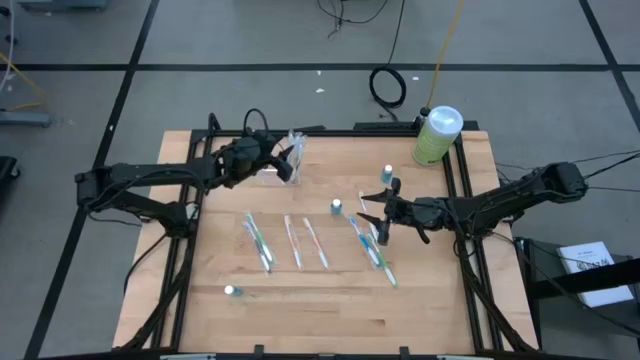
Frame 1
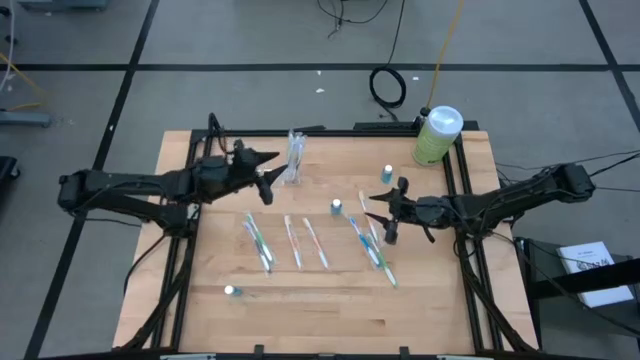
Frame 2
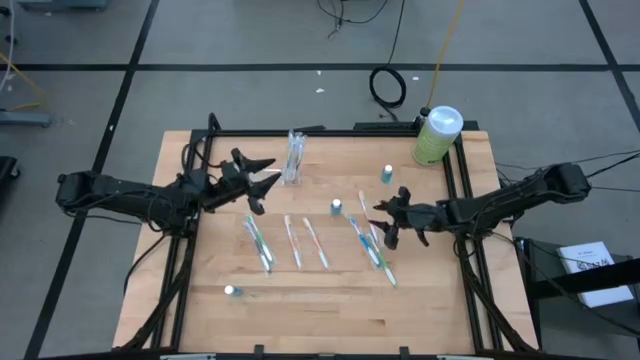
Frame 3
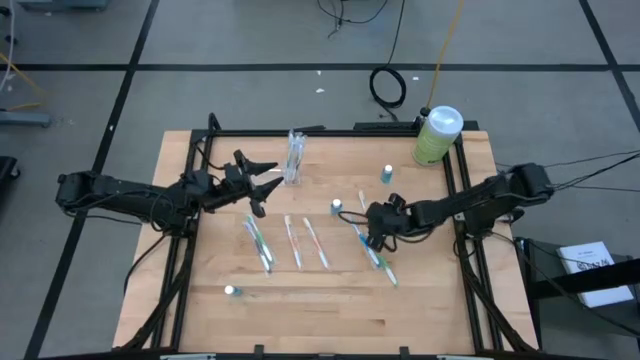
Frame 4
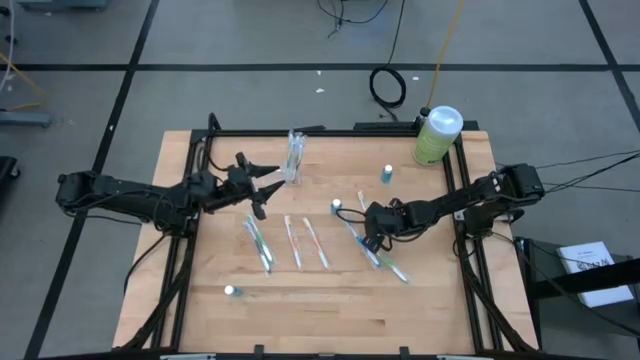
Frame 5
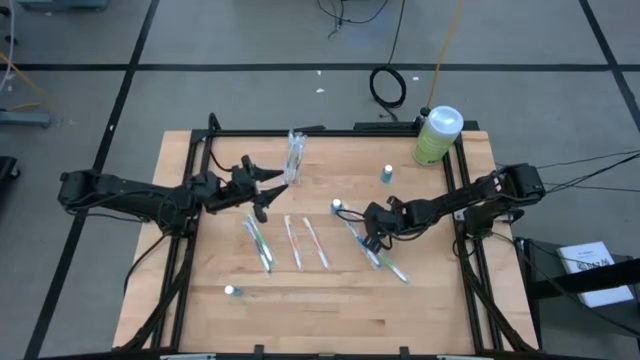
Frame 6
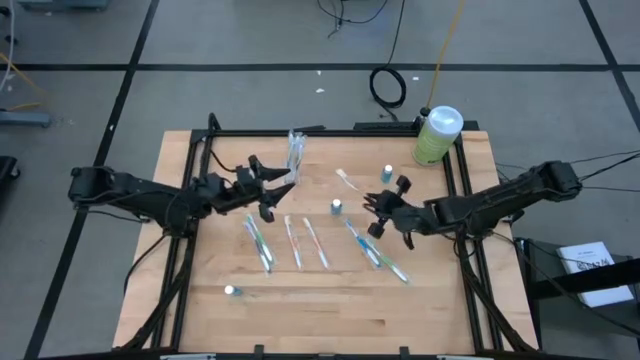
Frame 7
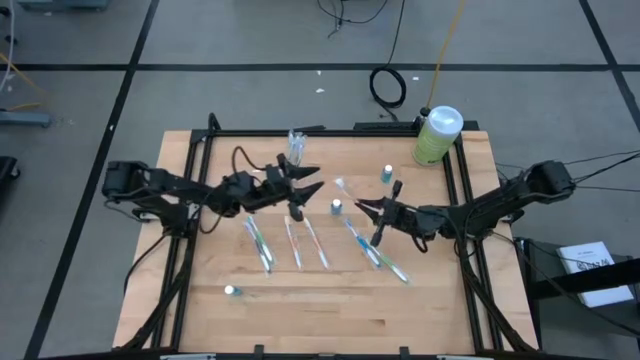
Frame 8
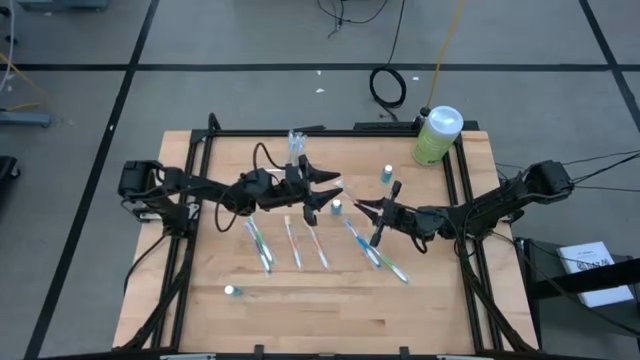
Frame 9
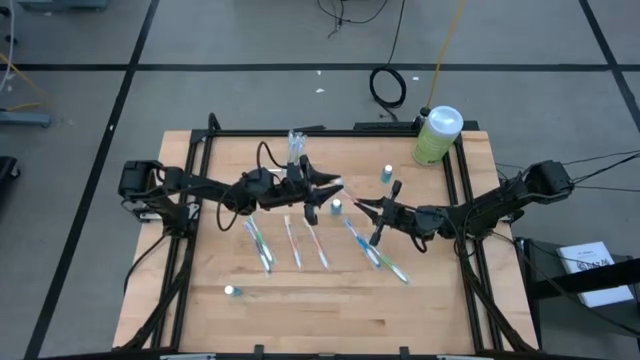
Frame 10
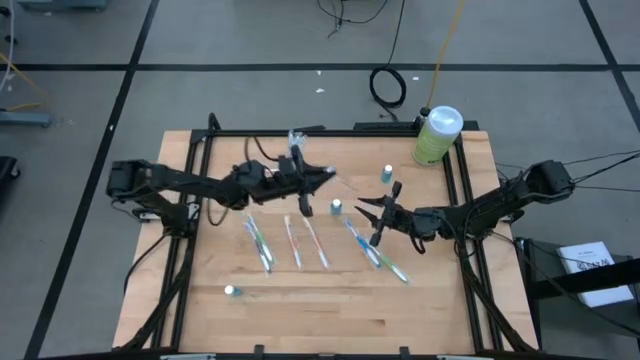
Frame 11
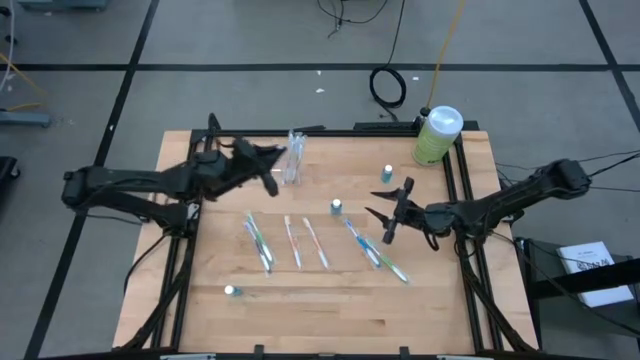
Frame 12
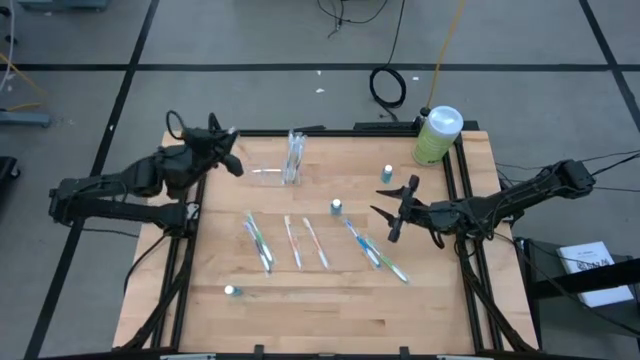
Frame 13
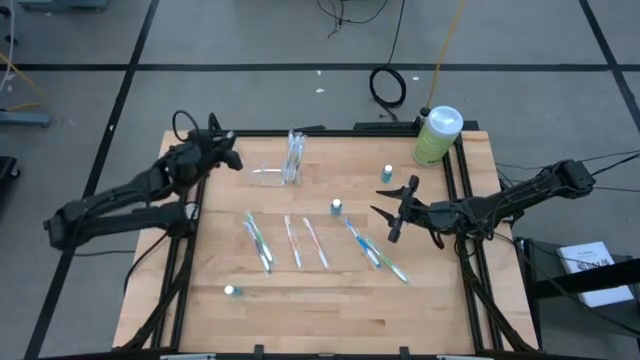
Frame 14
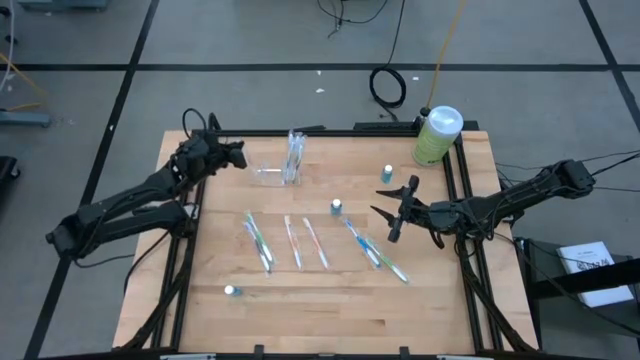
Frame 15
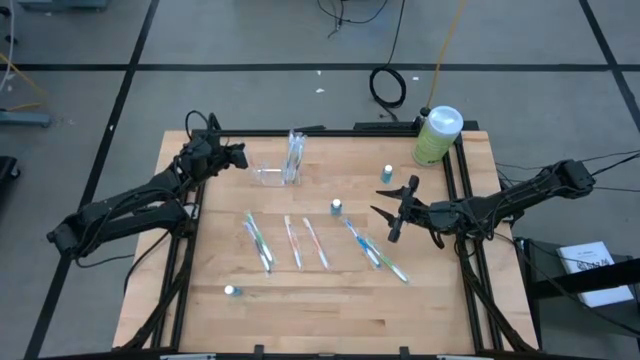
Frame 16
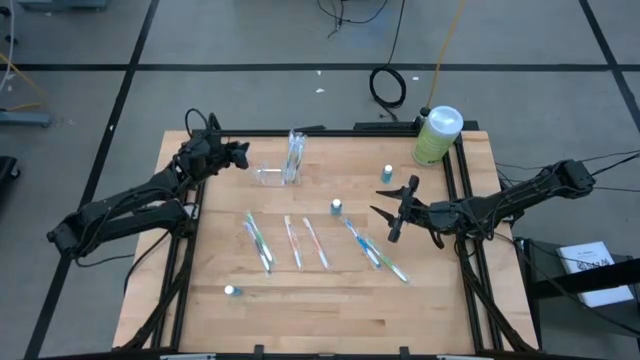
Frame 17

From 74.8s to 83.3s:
Task: Pick & Place toothbrushing station
Put the orange toothbrush into the transparent organizer

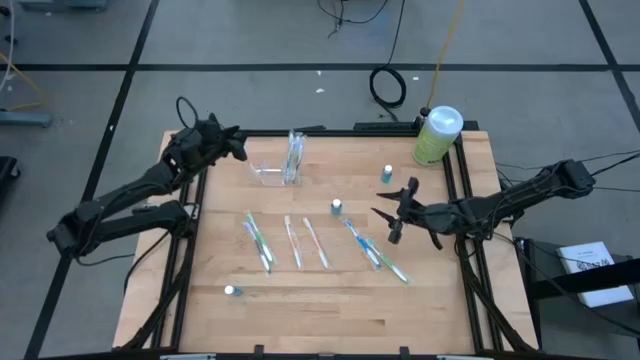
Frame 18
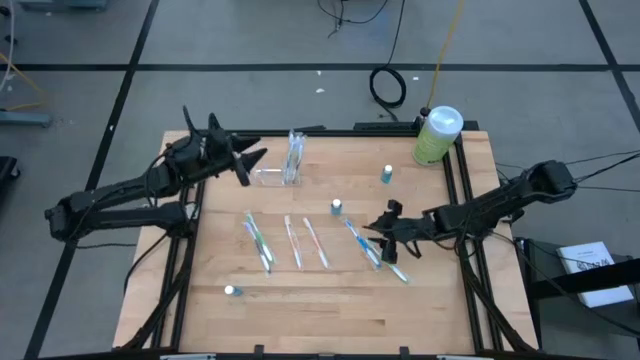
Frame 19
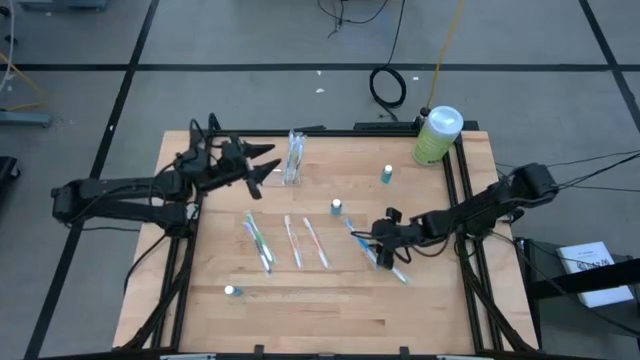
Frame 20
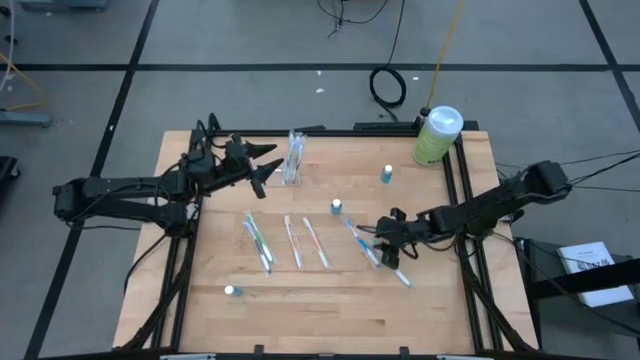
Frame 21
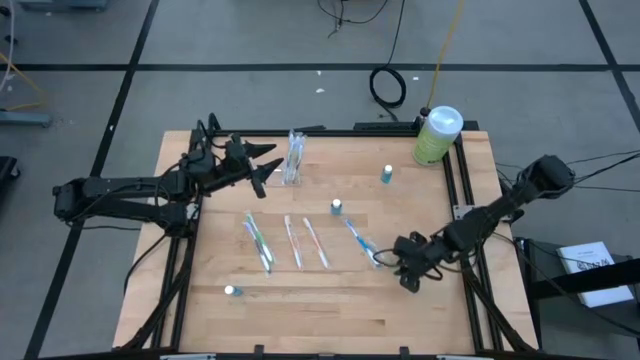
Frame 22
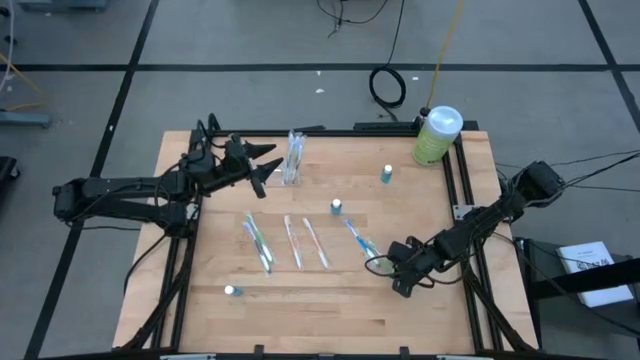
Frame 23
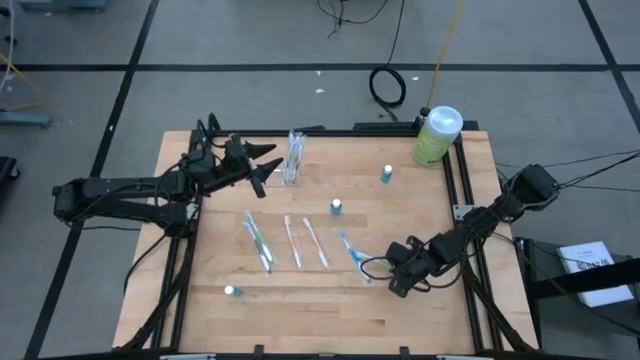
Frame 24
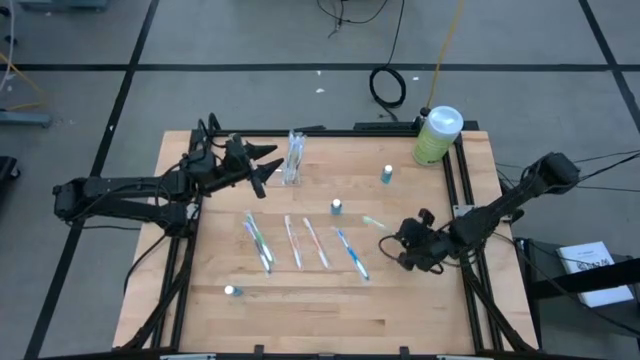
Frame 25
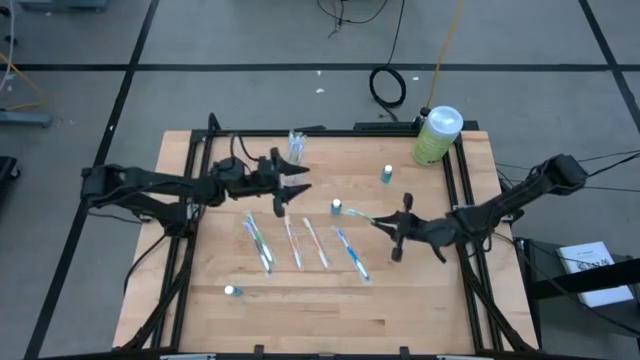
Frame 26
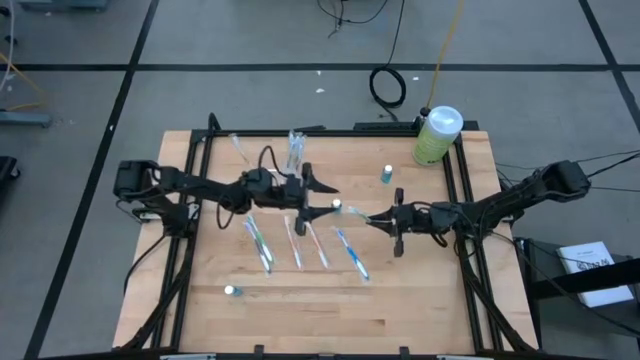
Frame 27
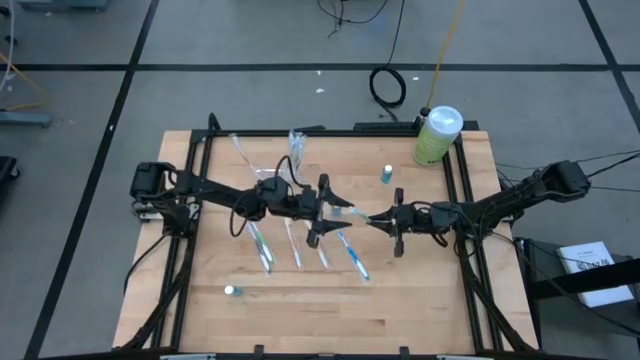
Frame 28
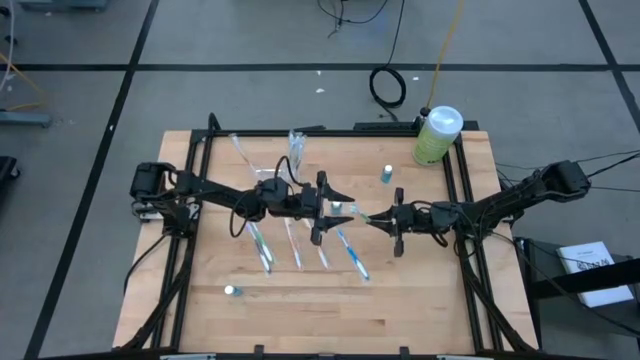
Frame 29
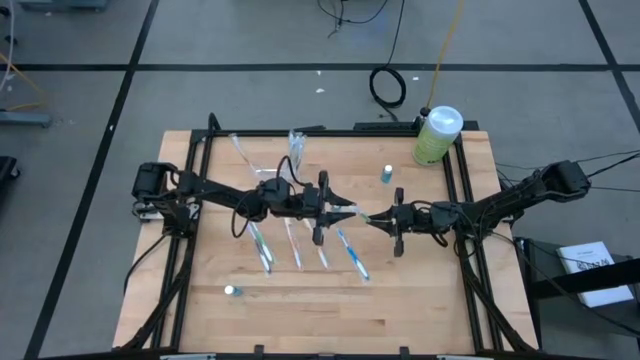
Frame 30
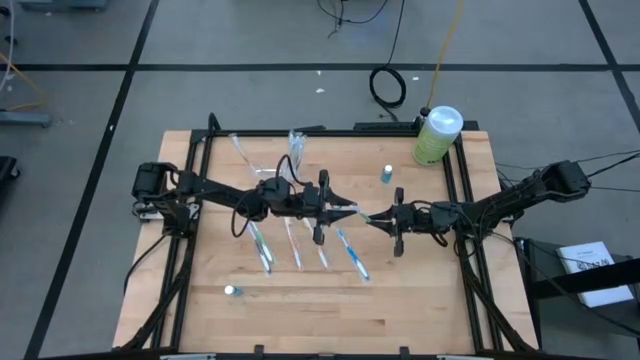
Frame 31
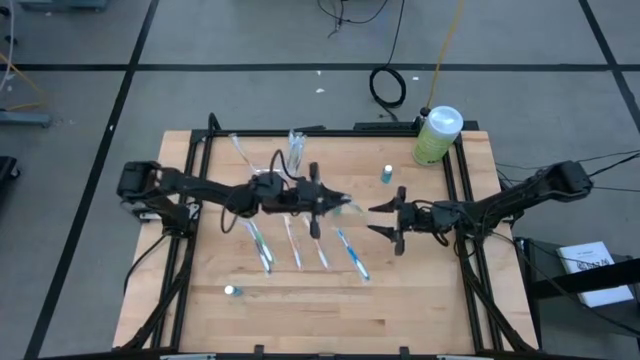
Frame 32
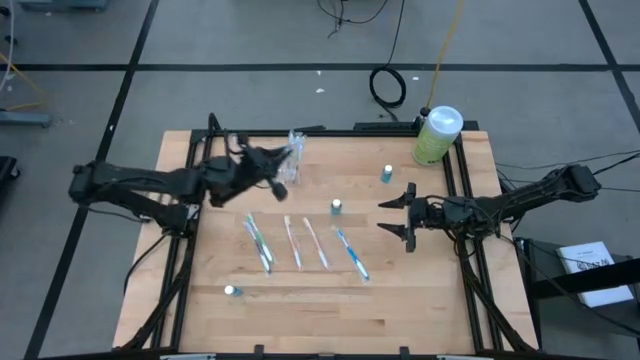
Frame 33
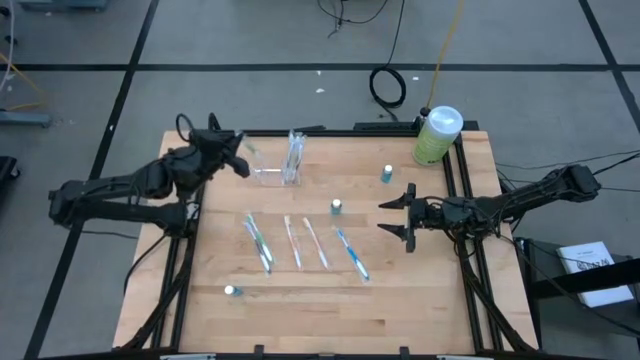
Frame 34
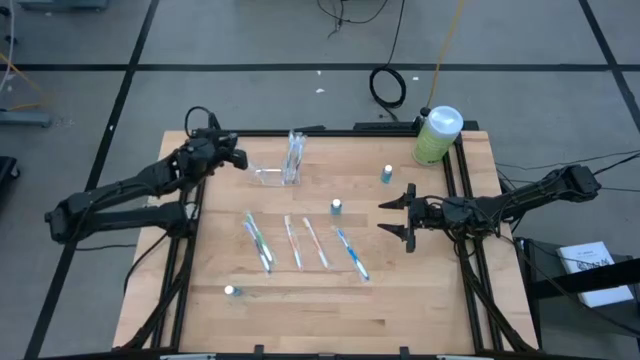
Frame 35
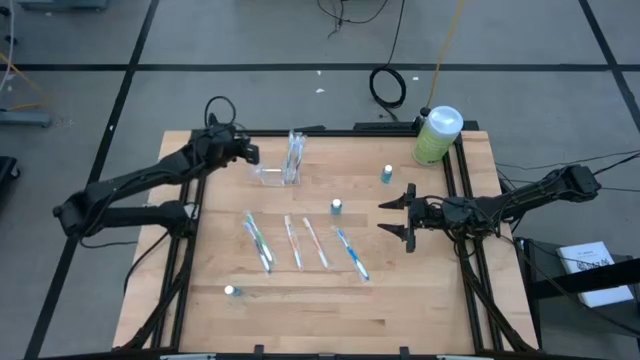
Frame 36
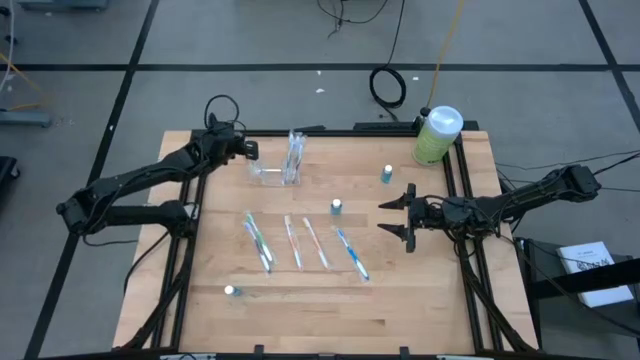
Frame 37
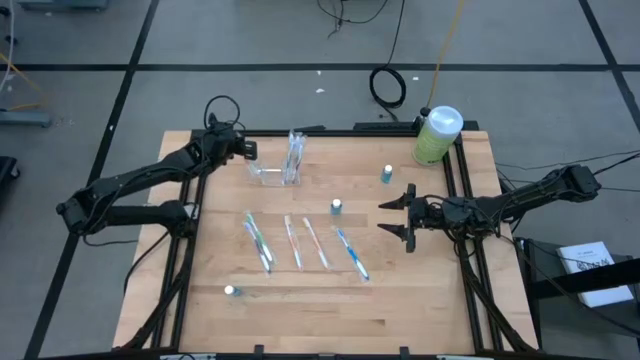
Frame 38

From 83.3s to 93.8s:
Put the green toothbrush into the transparent organizer

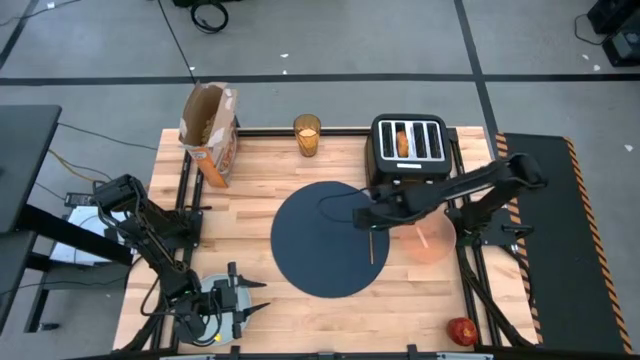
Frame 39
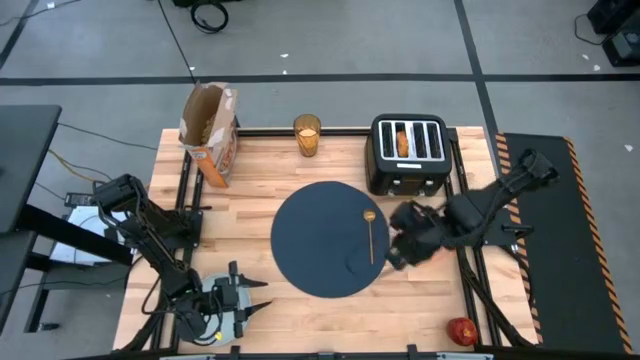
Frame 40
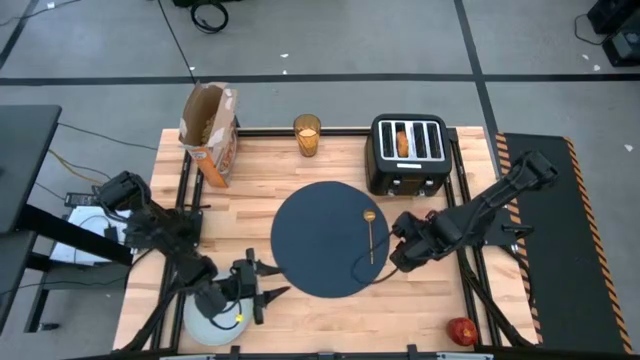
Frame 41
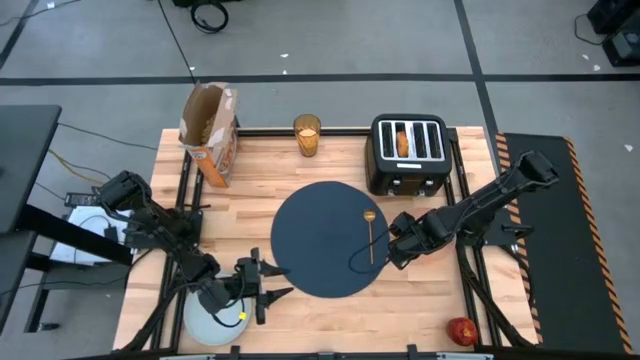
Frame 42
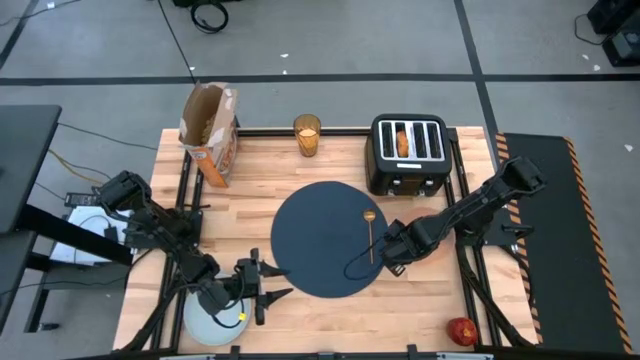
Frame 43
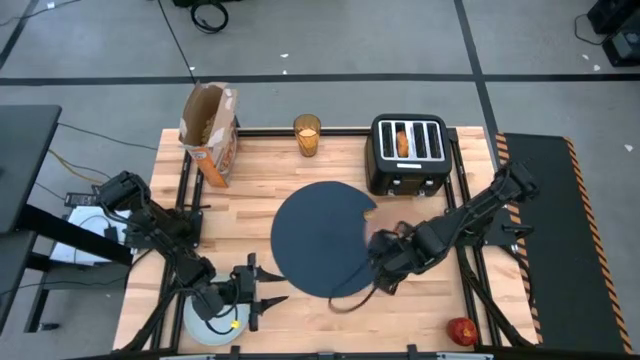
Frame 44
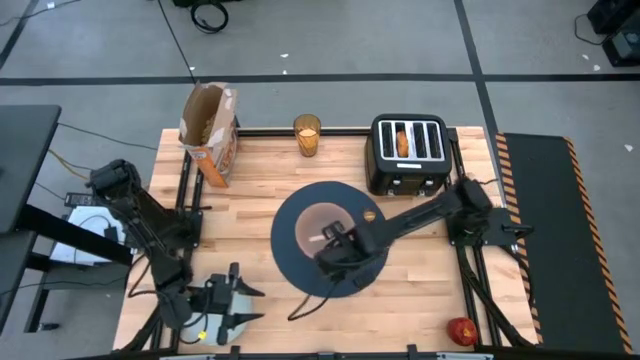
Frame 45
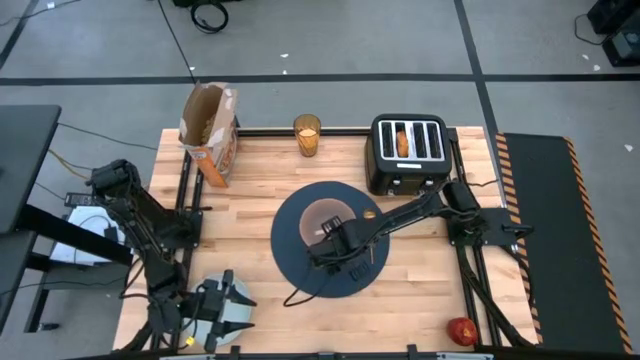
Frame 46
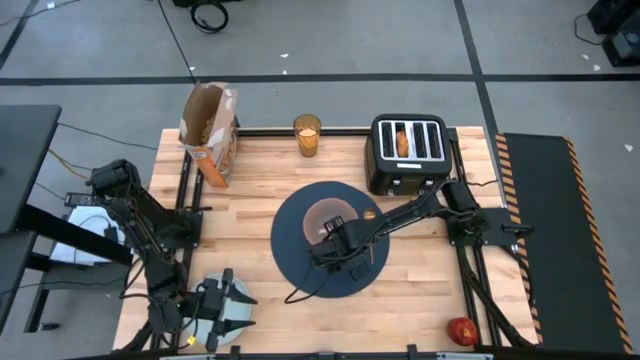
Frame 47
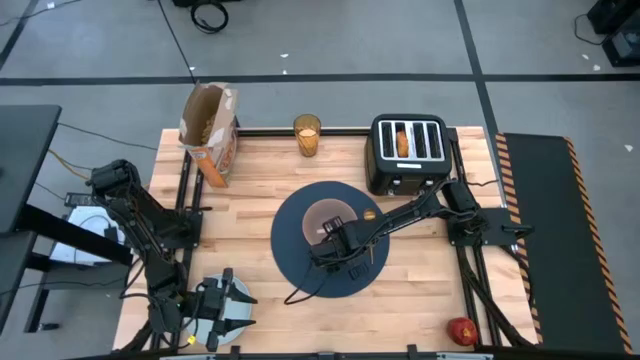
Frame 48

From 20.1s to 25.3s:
Task: Arrange a breakfast setting
Put the bowl on the placemat
